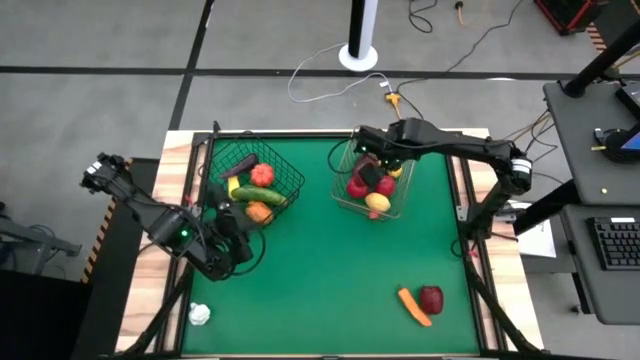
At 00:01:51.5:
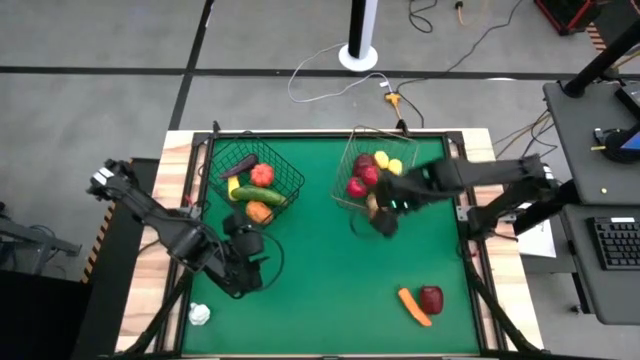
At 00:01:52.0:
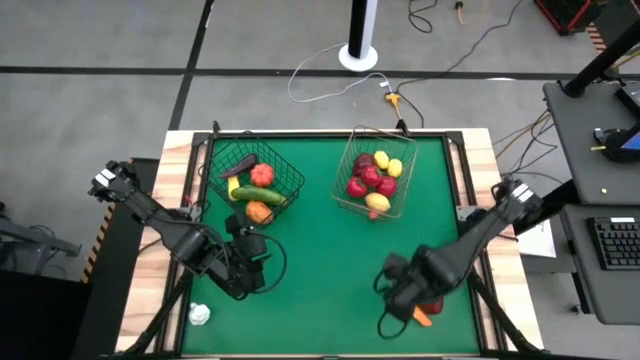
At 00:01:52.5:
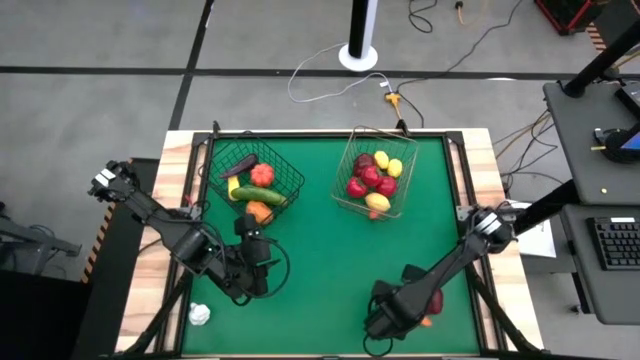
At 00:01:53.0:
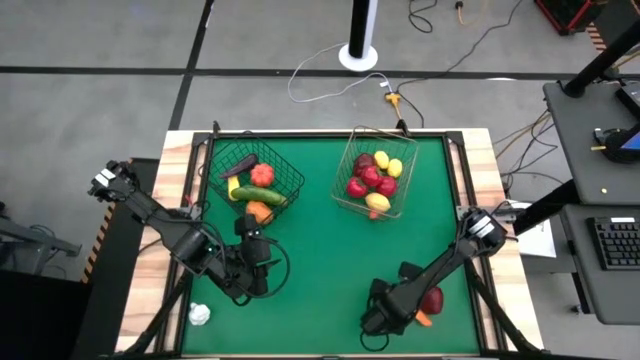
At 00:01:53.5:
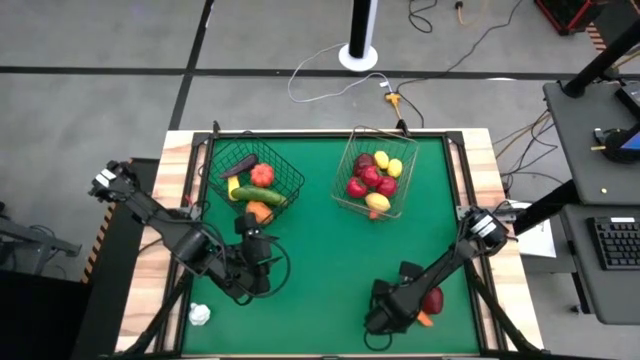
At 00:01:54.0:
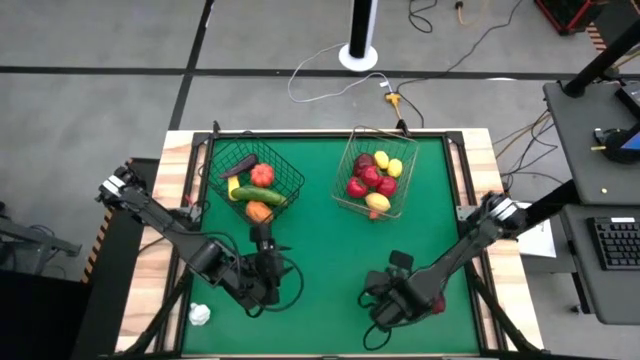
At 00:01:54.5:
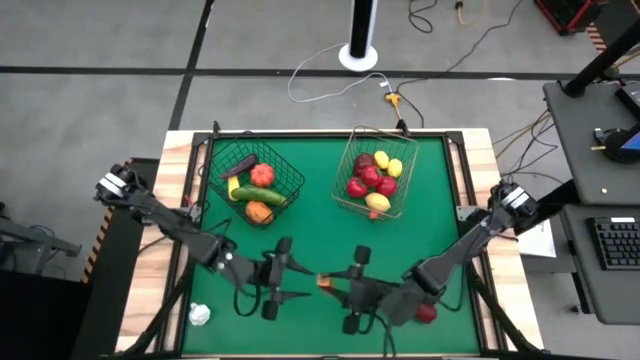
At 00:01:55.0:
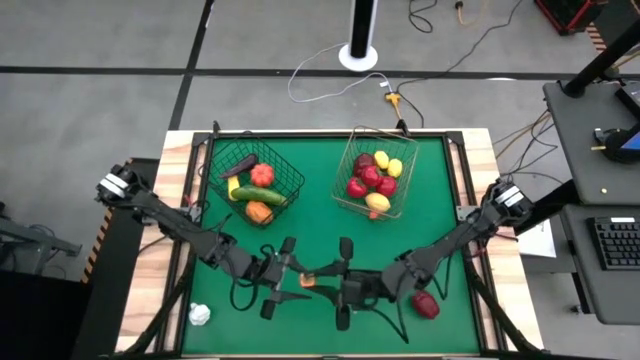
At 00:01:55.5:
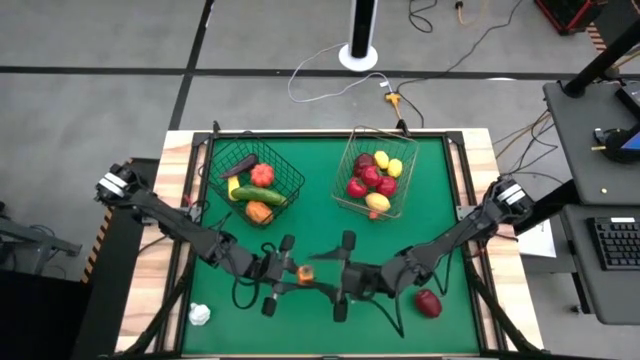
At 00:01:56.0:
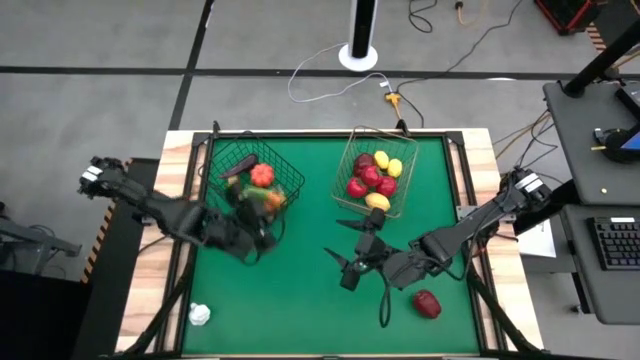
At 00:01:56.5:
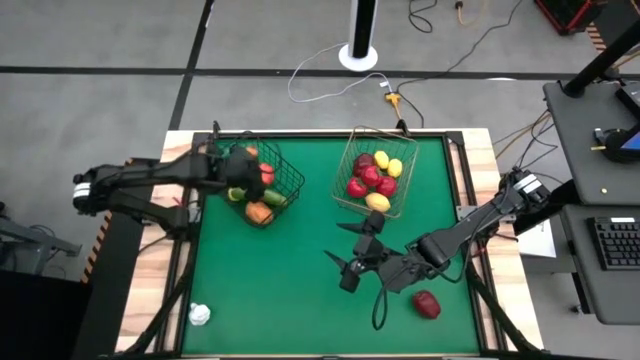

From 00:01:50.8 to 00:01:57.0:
Task: Sort produce into baskets
Put the orange chili pepper into the black wire basket

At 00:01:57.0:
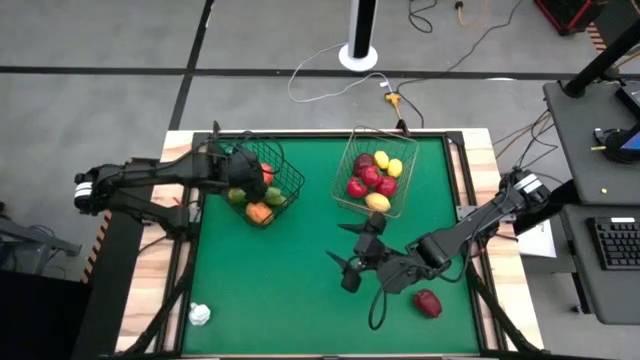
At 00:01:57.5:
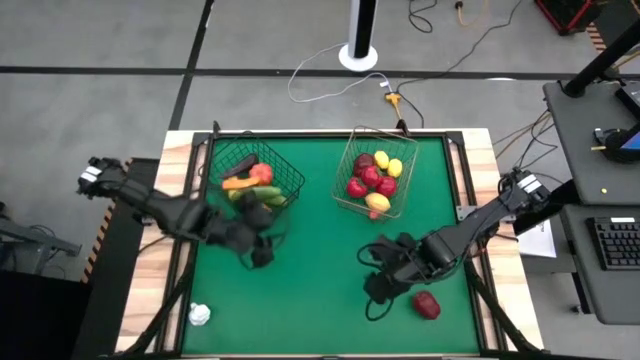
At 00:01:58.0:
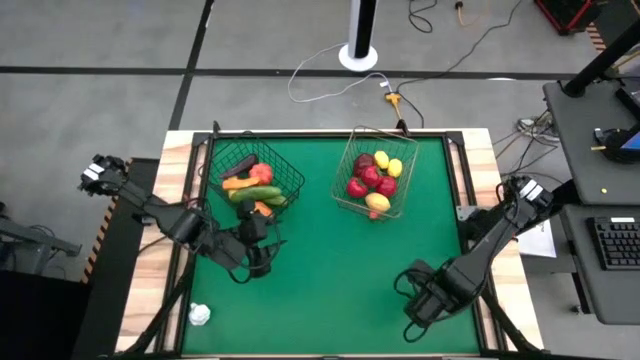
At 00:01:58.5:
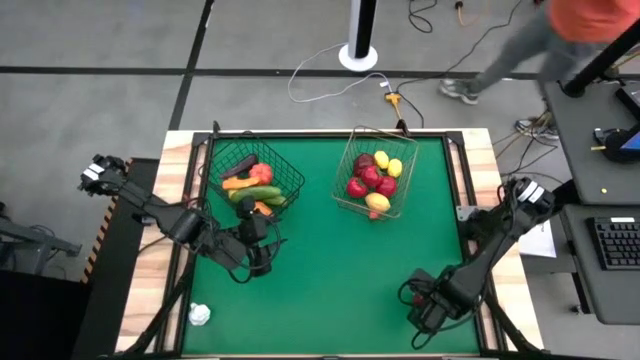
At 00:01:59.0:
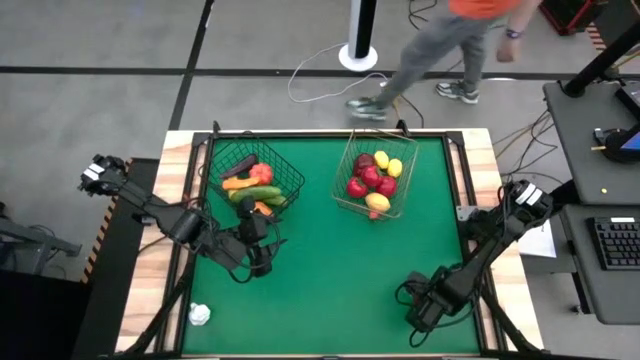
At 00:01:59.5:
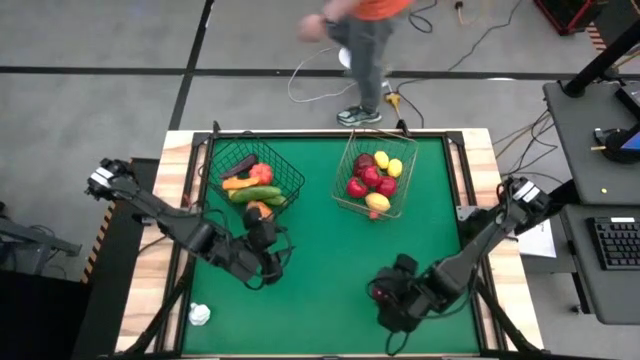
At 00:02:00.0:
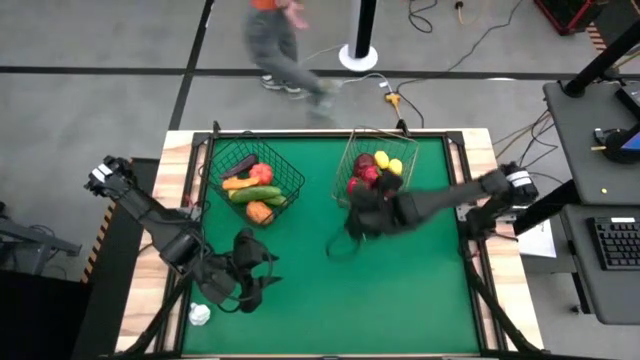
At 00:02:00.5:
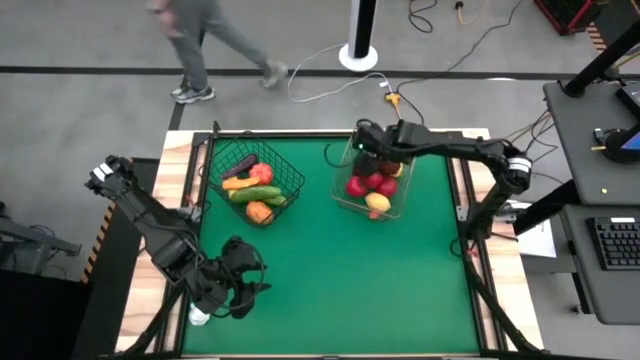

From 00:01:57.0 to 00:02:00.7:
Put the red apple into the gold wire basket

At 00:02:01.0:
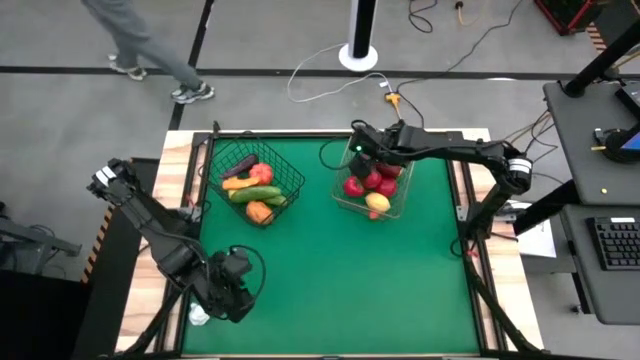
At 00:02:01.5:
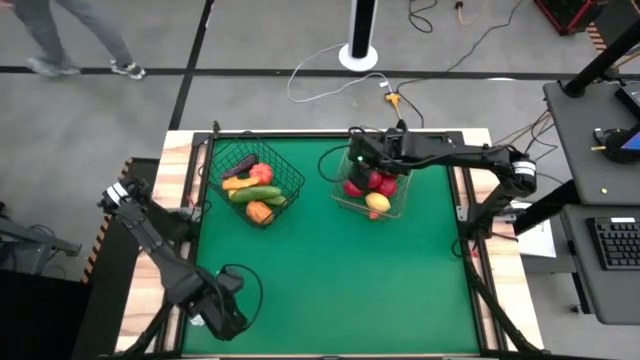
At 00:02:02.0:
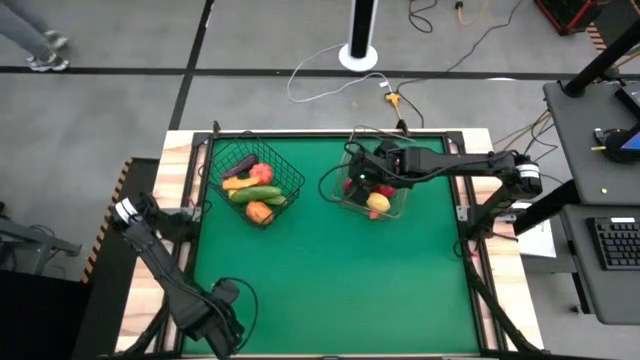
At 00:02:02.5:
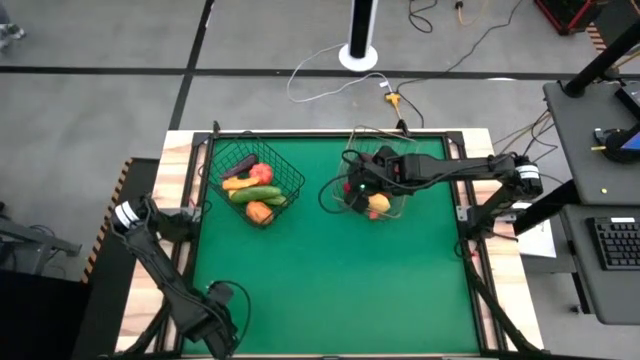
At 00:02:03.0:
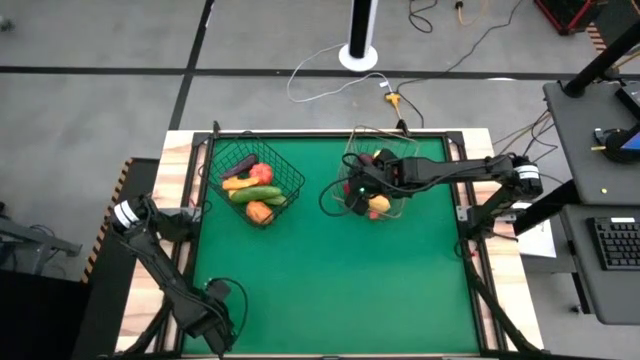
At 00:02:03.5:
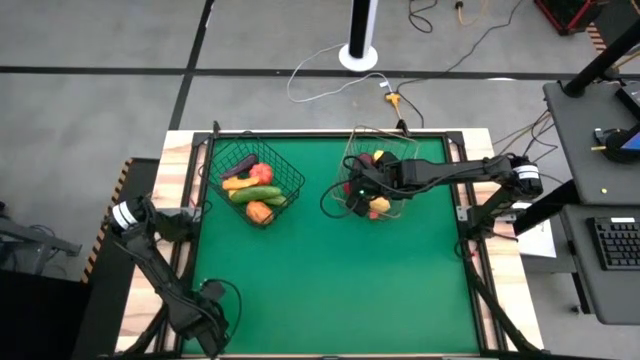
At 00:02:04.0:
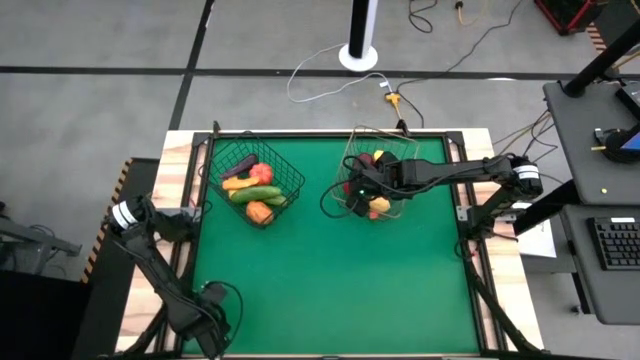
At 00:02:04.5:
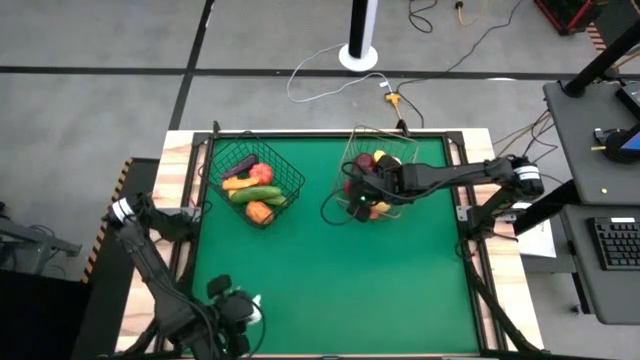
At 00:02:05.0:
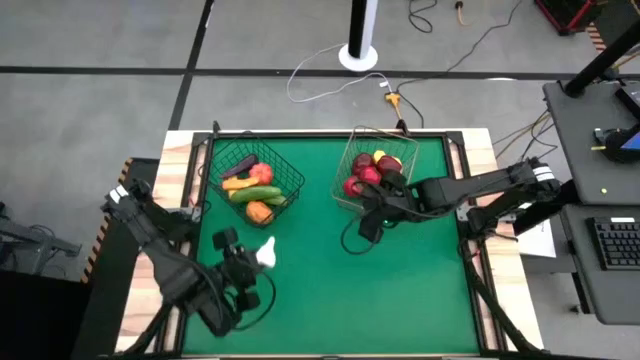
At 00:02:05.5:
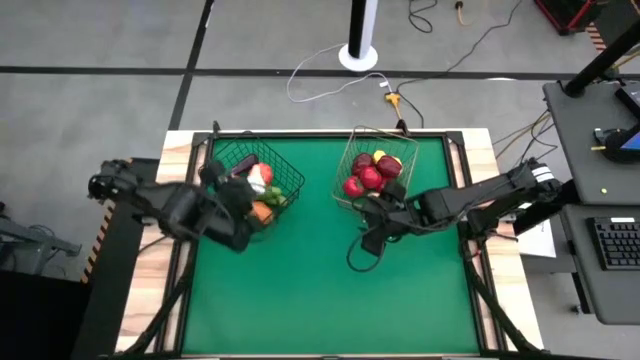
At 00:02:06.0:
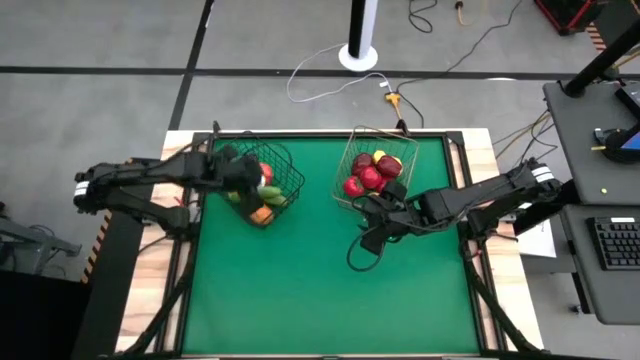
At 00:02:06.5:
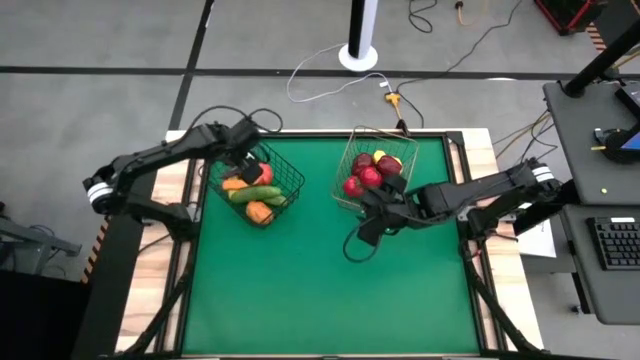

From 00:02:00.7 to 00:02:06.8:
Put the white garlic into the black wire basket

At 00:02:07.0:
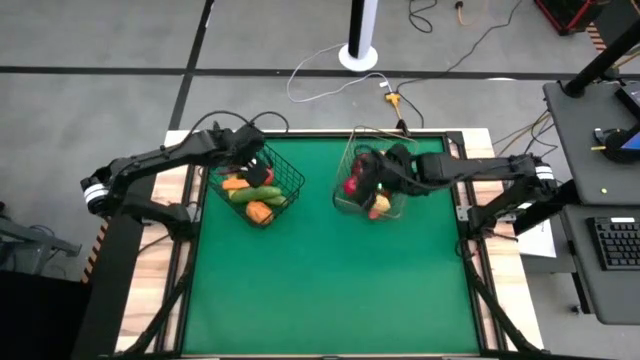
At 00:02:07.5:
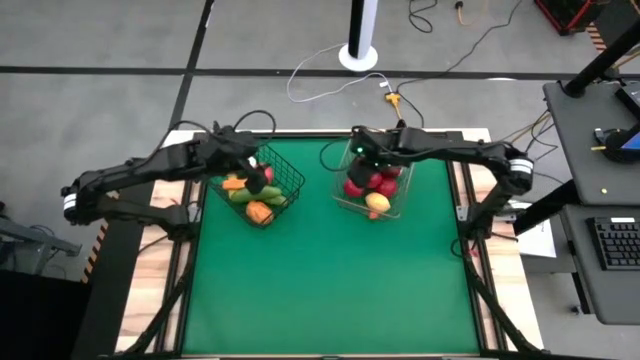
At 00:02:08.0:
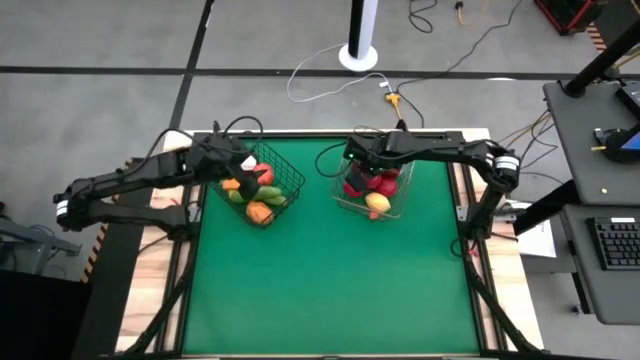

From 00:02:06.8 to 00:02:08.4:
Adjust the red tomato in the gold wire basket

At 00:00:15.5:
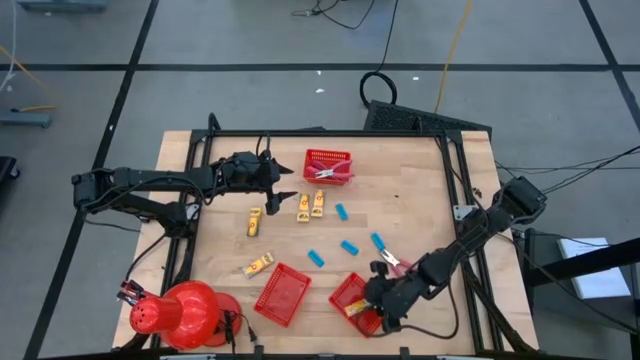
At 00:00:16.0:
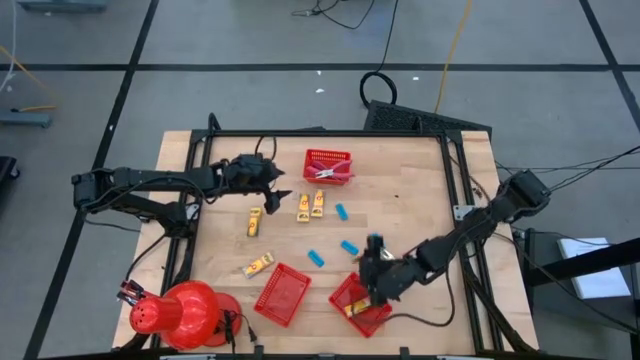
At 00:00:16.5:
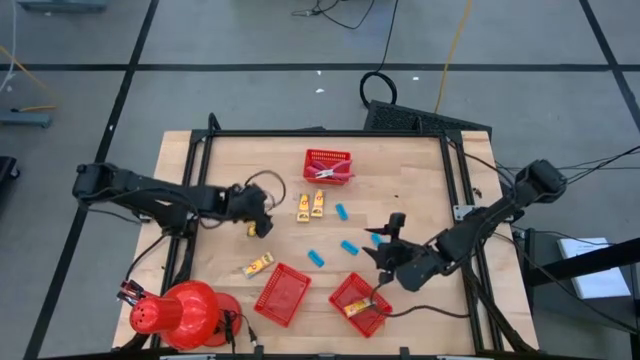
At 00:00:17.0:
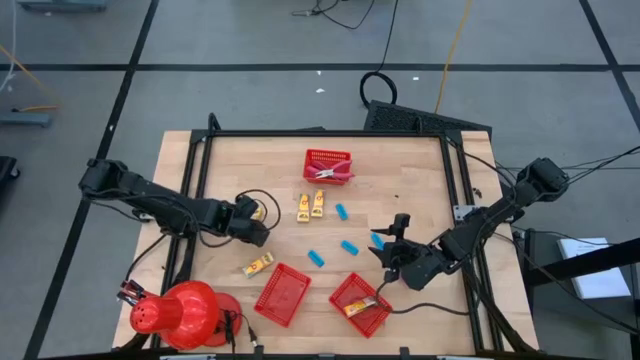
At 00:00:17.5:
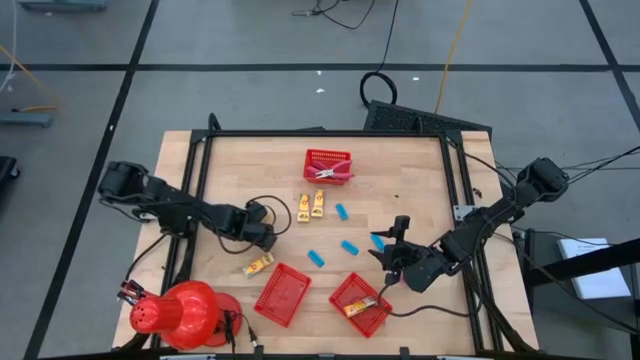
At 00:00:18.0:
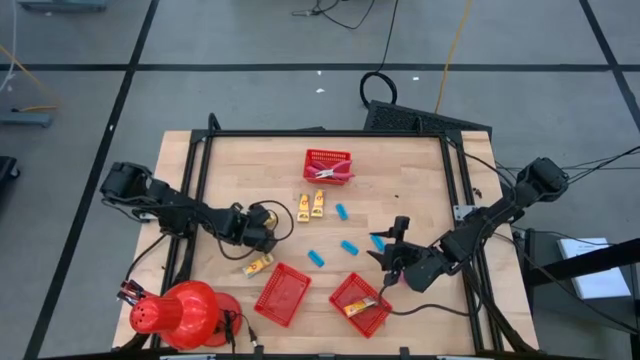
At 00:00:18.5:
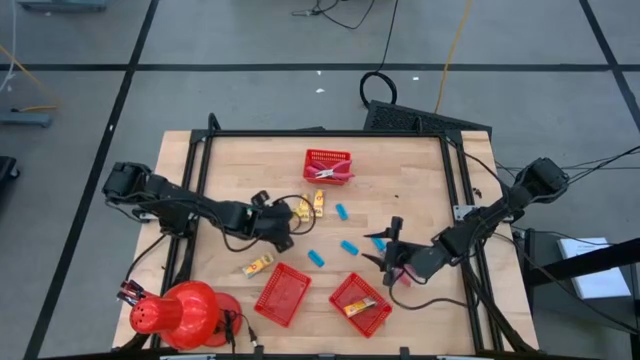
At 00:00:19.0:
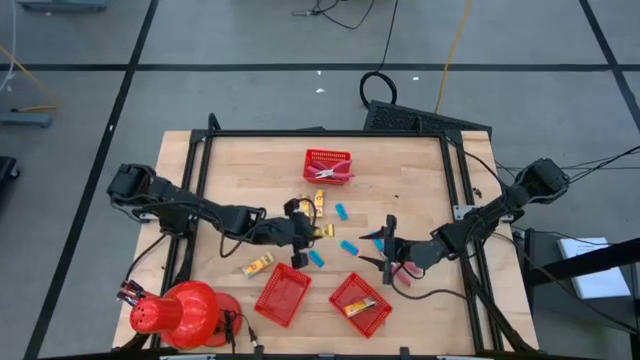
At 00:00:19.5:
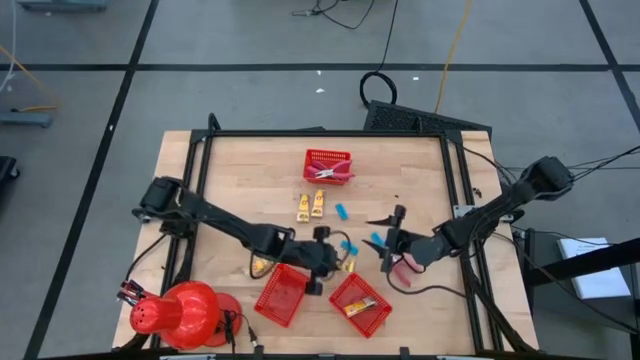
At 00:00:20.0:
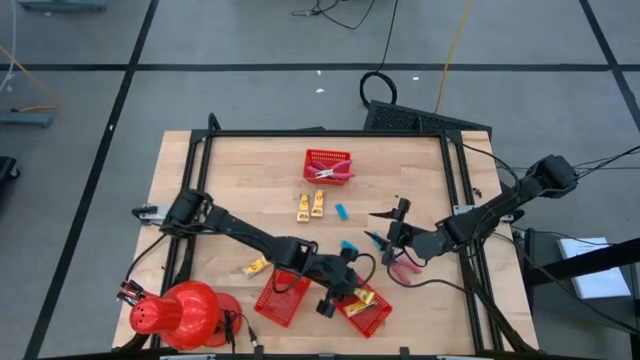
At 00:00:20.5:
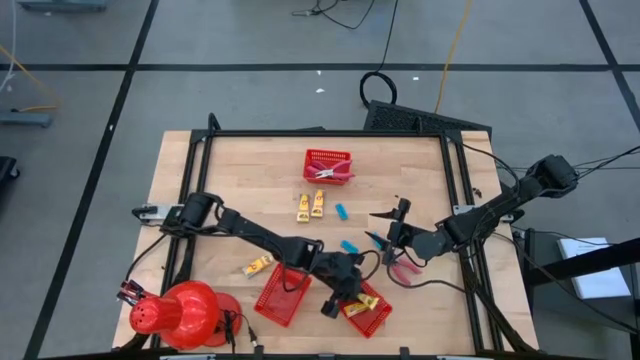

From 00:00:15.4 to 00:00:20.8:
Task: Pick & Place School Supplies
Put the yellow crayon pack into the bottom right red basket
